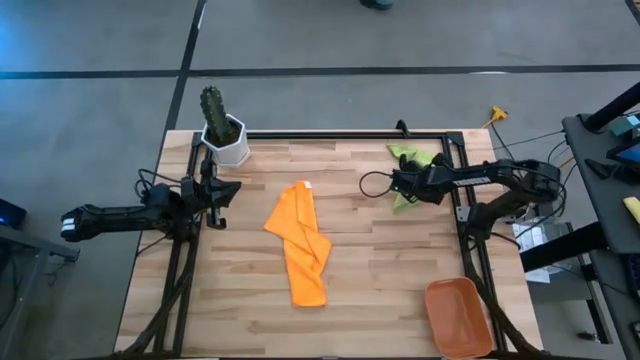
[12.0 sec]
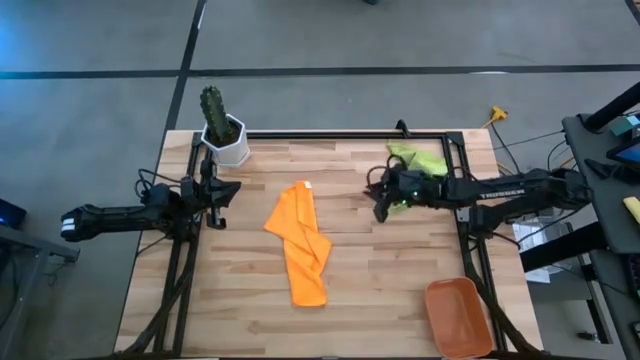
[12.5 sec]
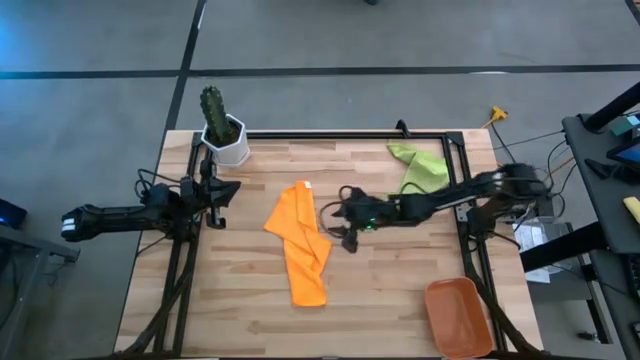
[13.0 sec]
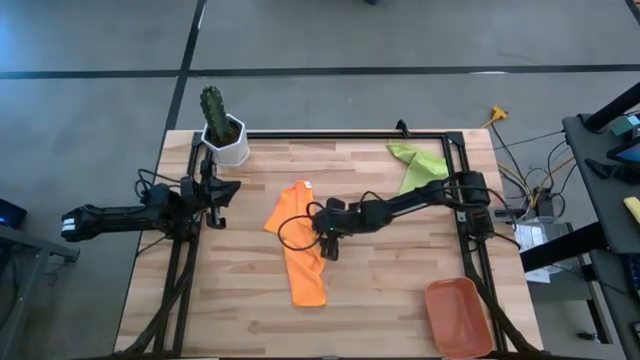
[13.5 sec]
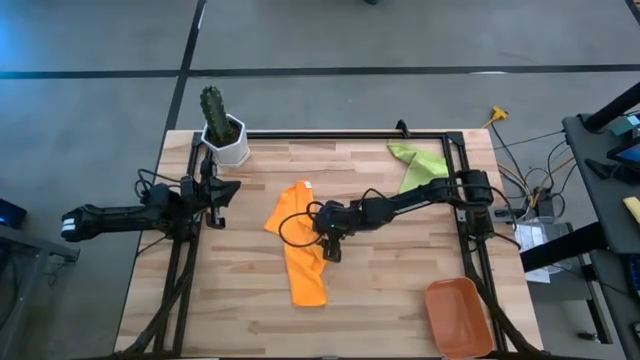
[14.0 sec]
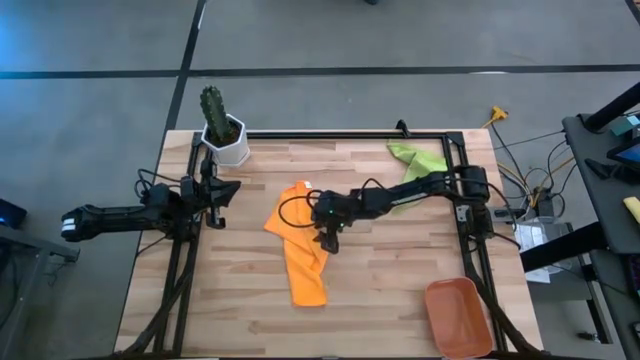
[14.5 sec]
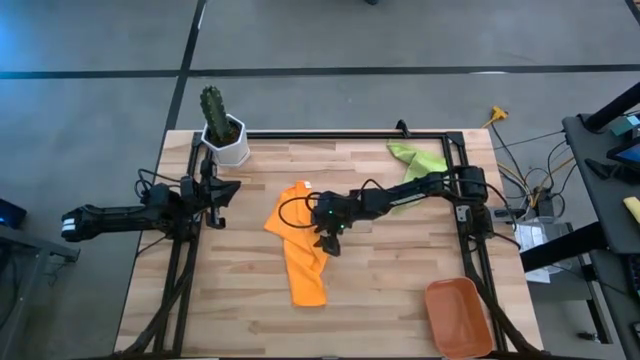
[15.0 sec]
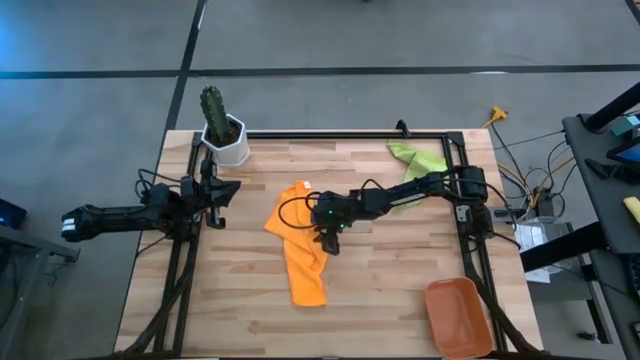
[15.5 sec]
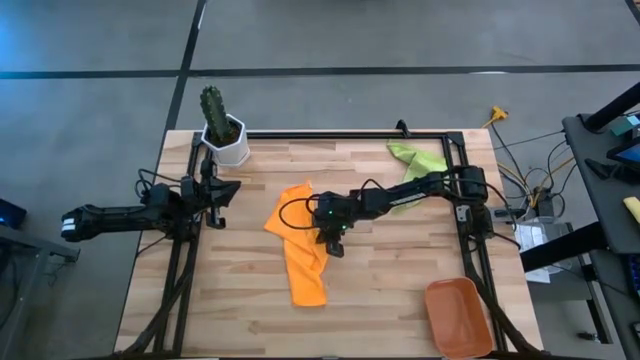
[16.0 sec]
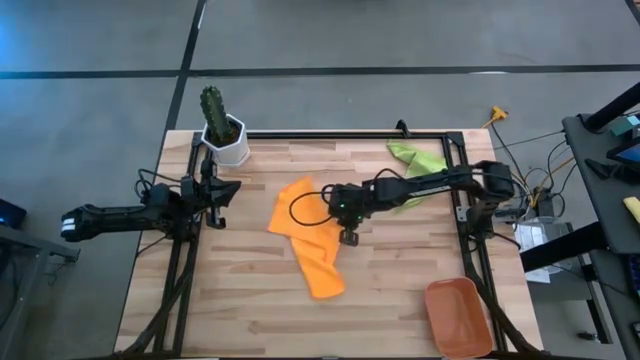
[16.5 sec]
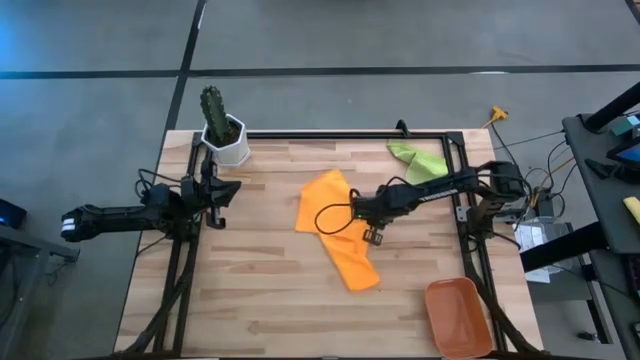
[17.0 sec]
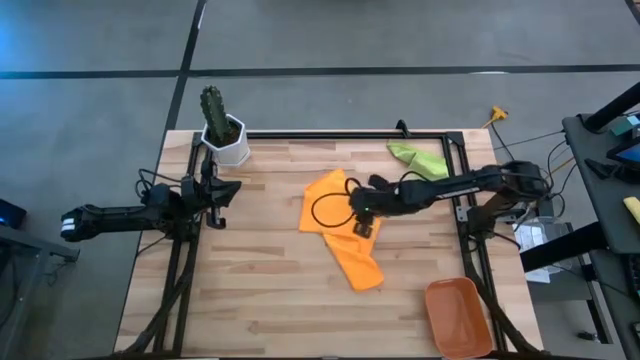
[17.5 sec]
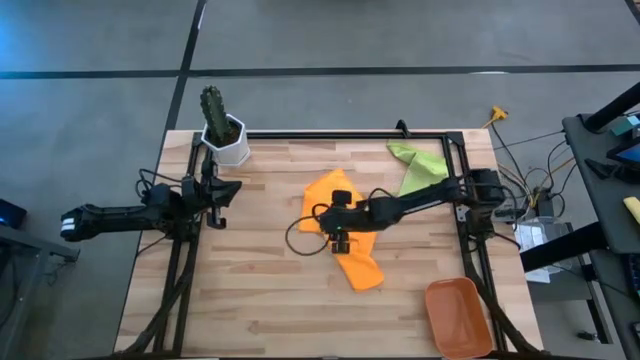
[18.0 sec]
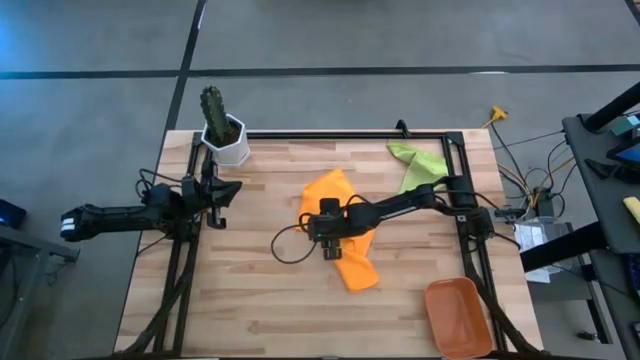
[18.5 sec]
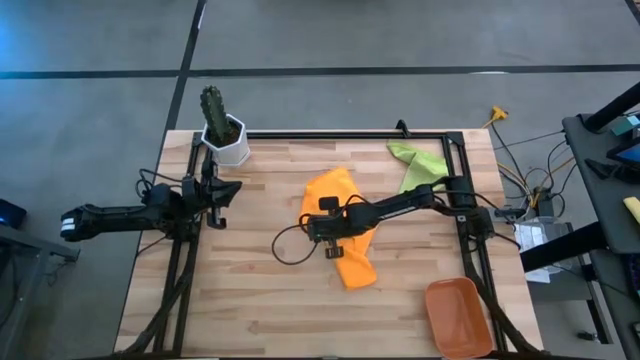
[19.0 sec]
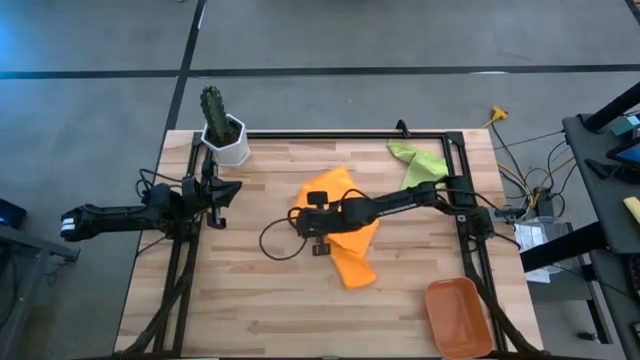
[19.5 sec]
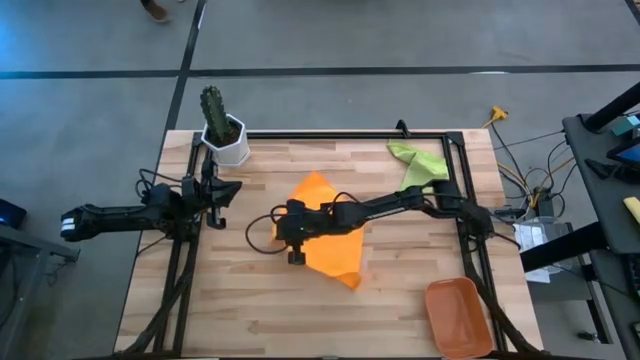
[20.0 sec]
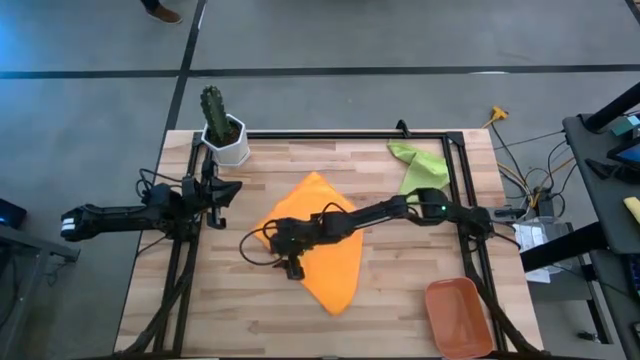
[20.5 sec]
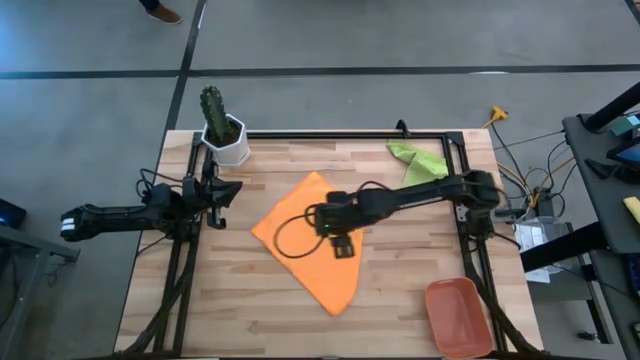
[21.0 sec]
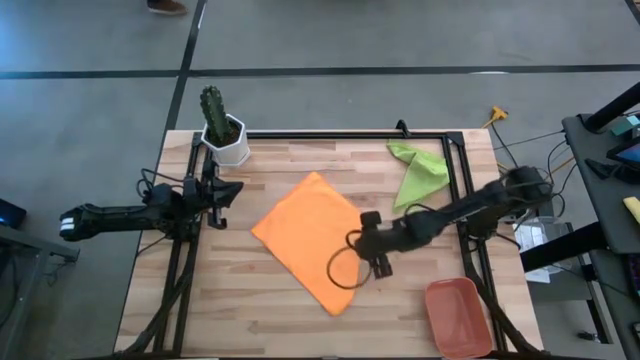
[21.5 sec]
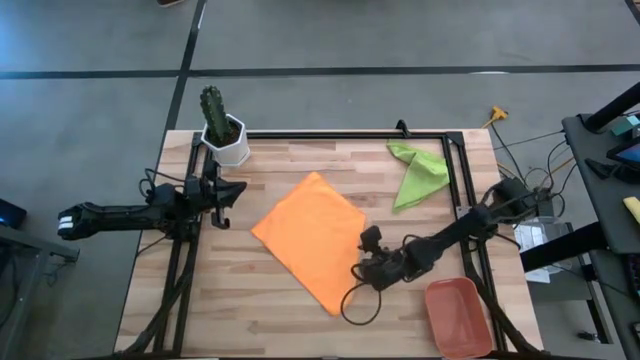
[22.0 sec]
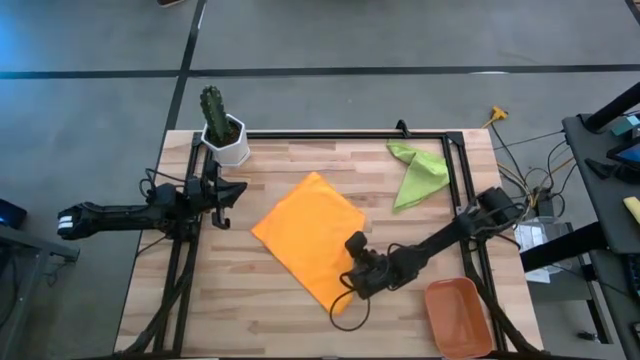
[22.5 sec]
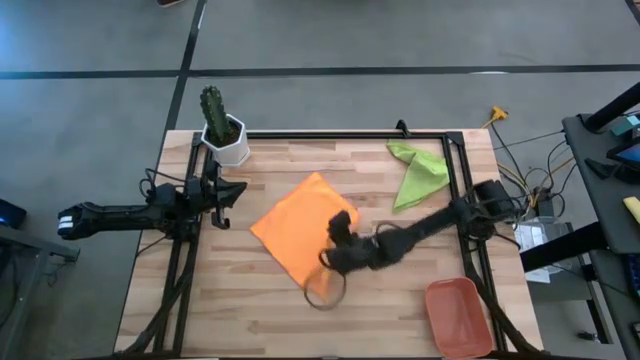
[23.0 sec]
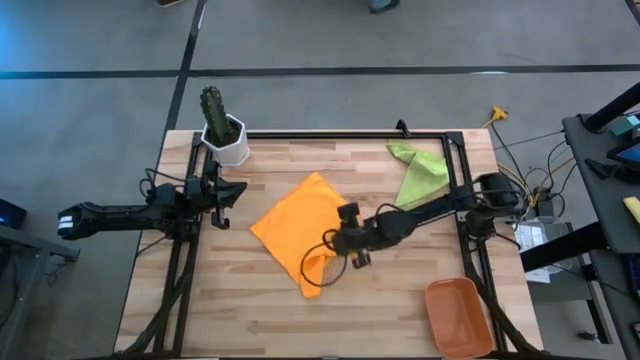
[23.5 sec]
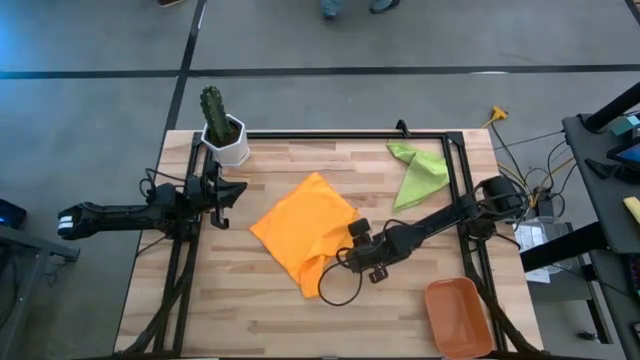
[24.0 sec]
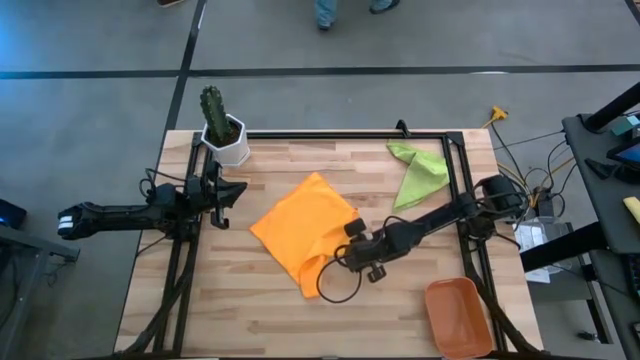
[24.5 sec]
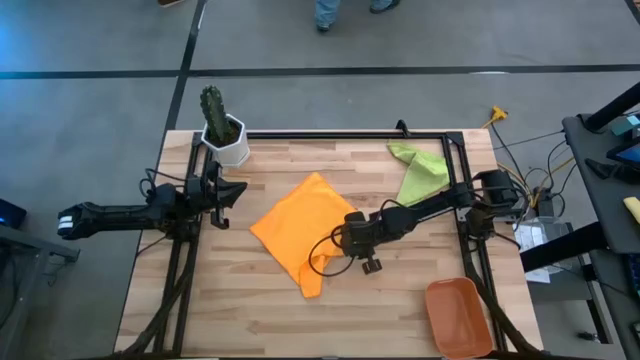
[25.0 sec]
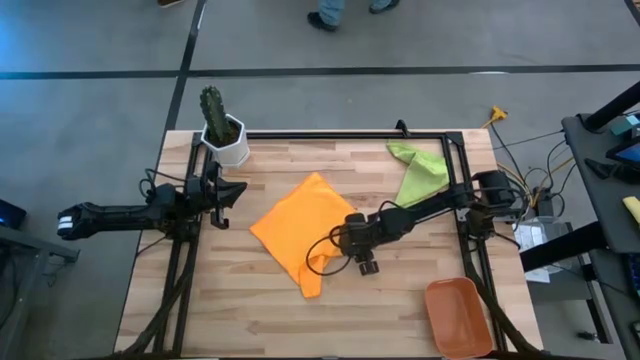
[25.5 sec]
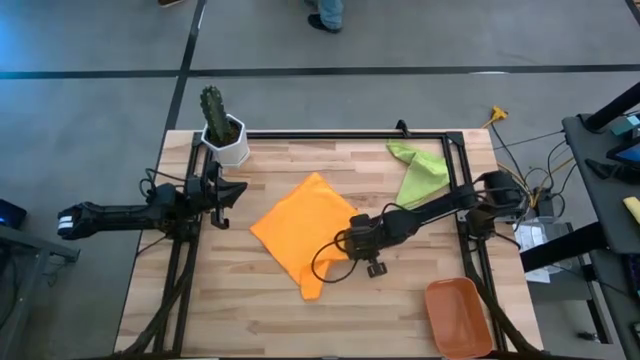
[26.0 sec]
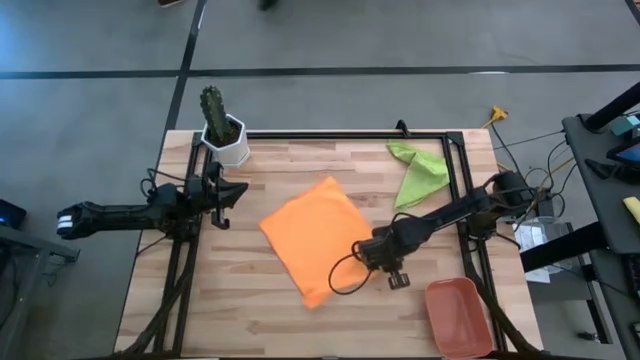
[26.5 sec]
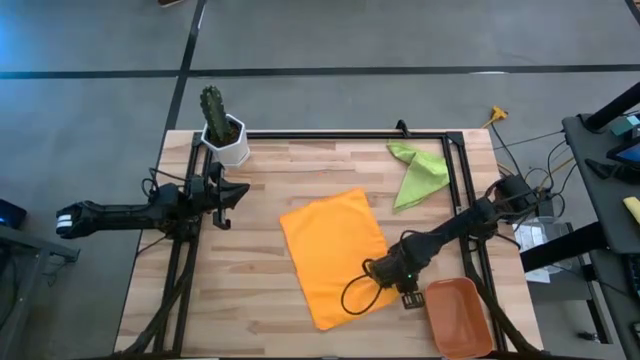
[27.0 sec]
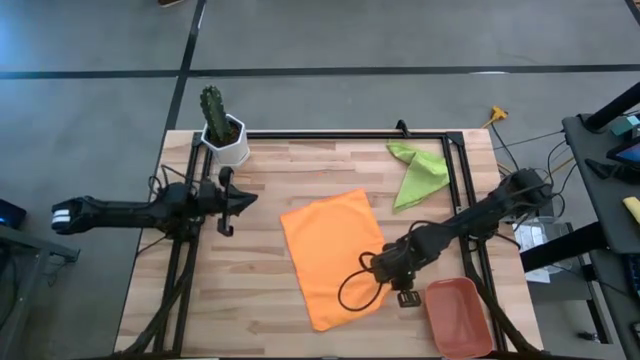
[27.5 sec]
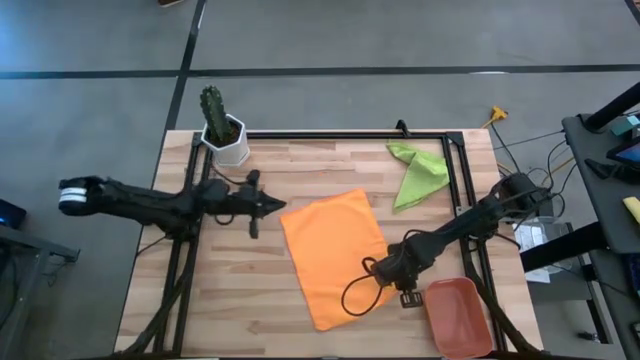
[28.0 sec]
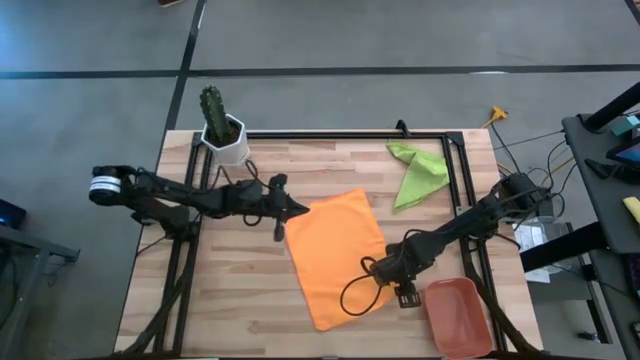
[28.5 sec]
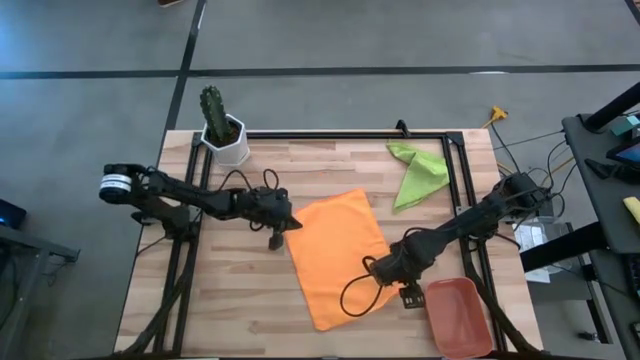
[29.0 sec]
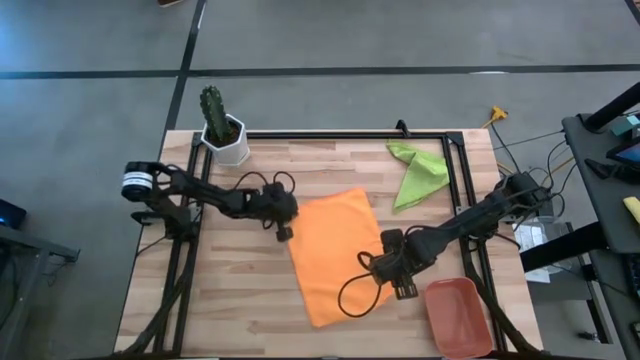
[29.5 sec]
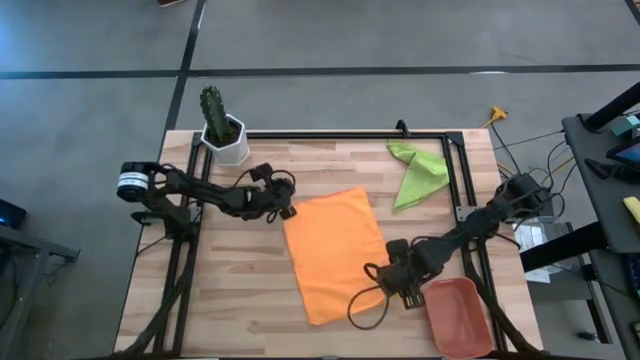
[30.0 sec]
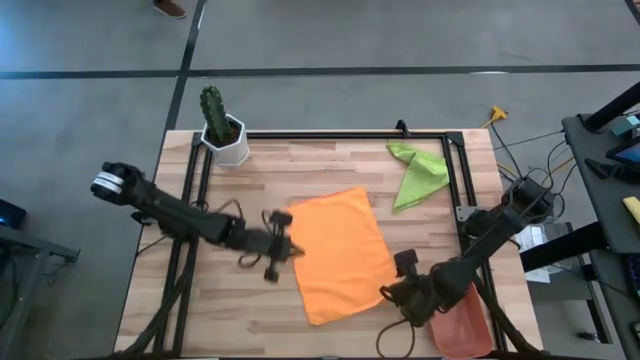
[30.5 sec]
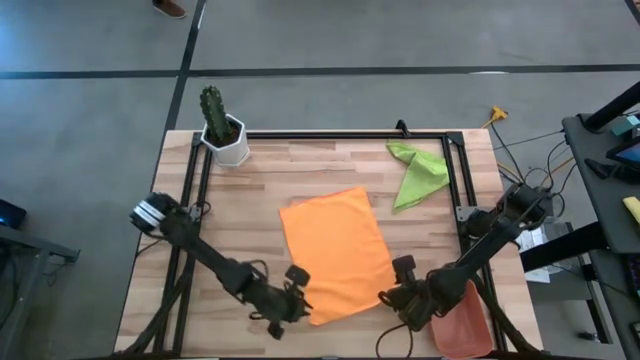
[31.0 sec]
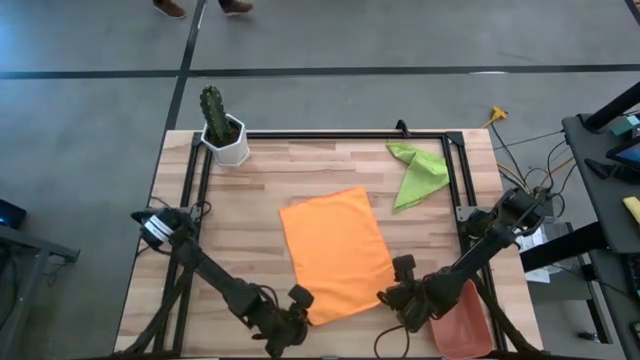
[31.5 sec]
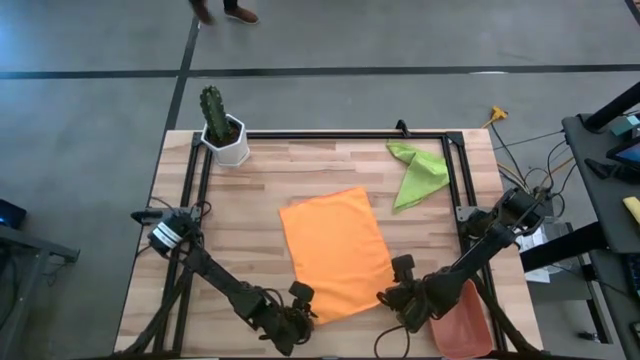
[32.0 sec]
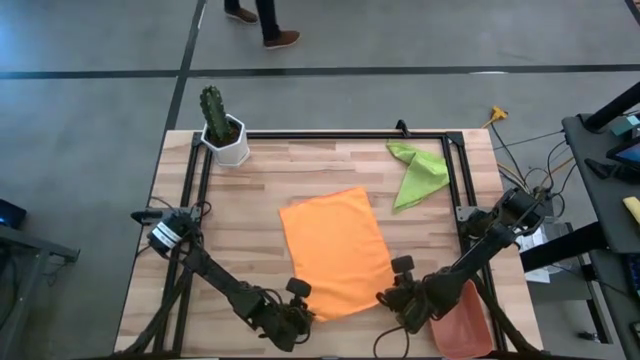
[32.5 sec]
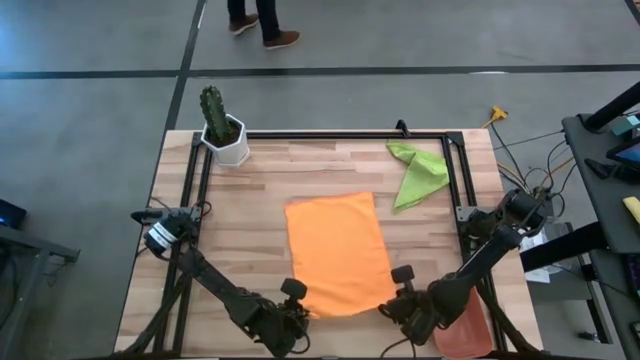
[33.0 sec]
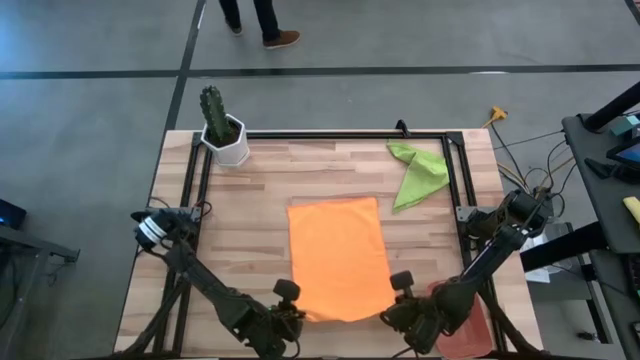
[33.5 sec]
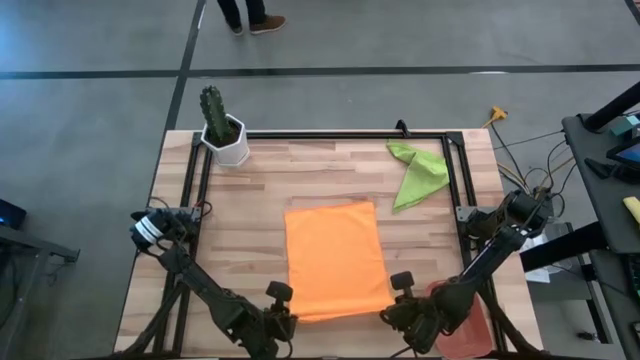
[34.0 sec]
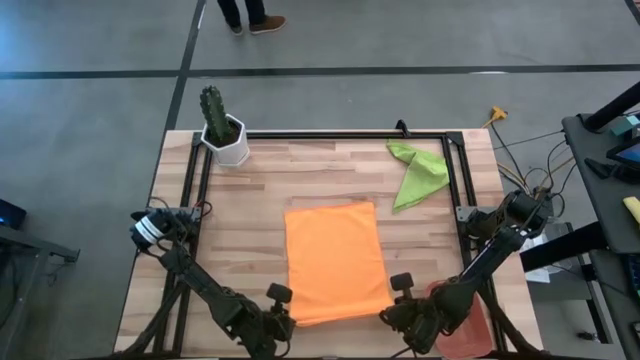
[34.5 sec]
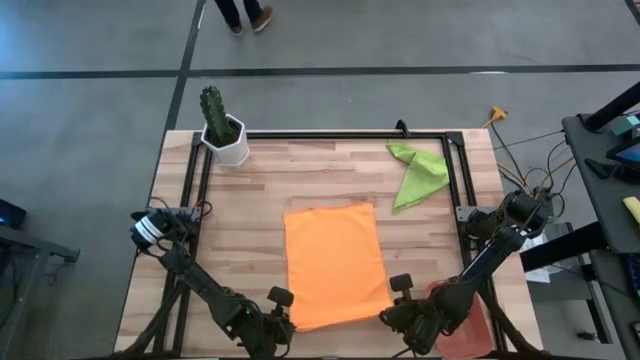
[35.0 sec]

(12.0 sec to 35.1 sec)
Task: Roll microfiber towels into tight, uniform cylinder then place into a basket
Fold the orange microfiber cloth
